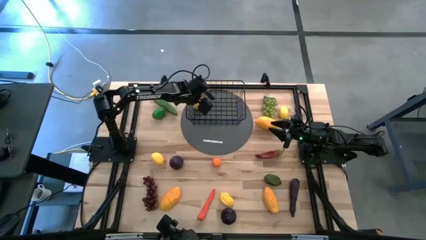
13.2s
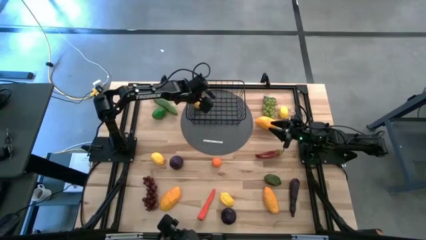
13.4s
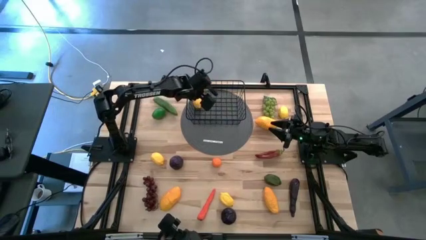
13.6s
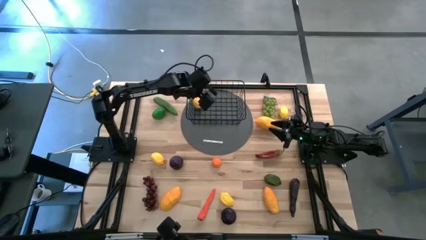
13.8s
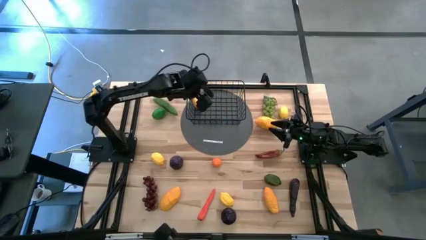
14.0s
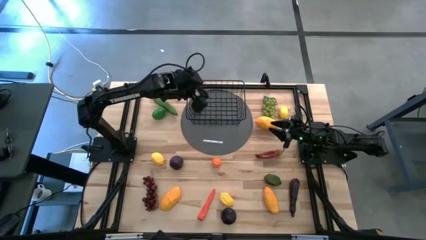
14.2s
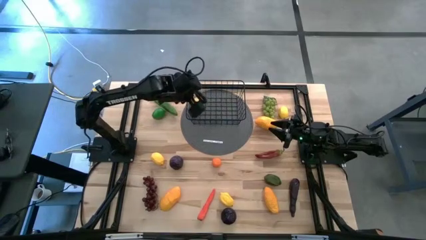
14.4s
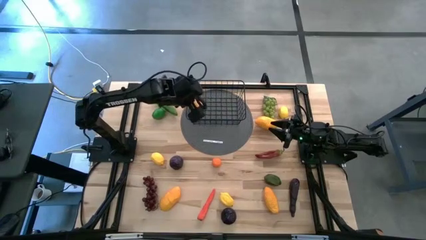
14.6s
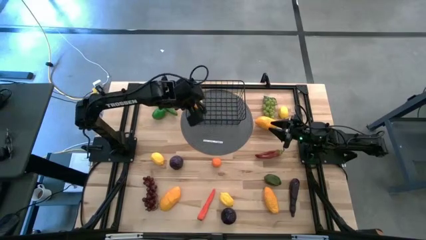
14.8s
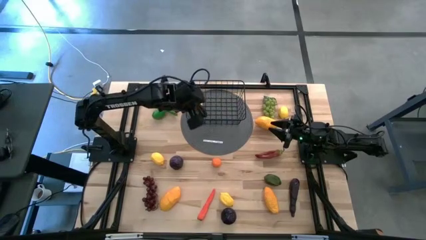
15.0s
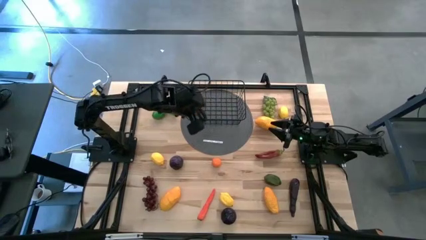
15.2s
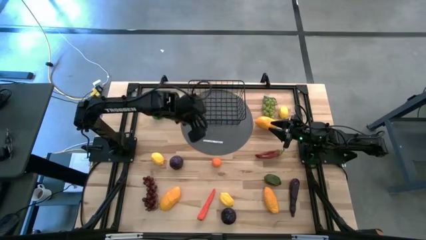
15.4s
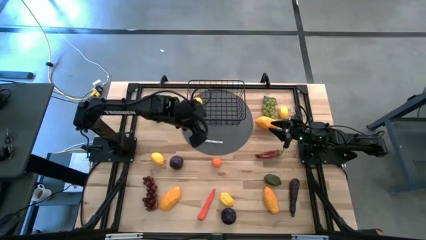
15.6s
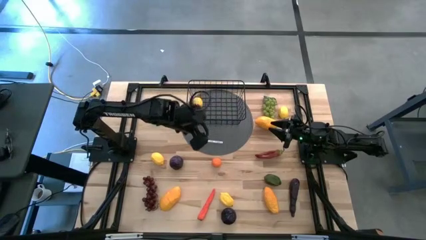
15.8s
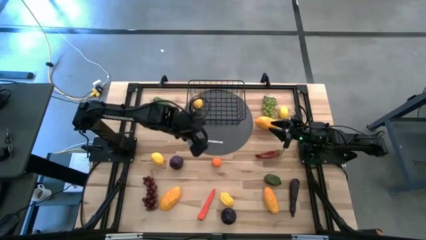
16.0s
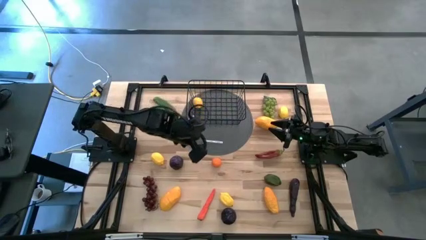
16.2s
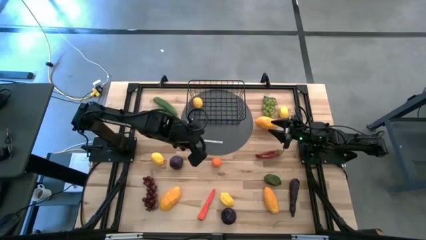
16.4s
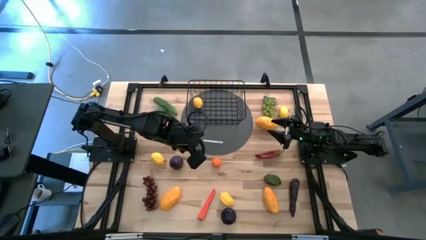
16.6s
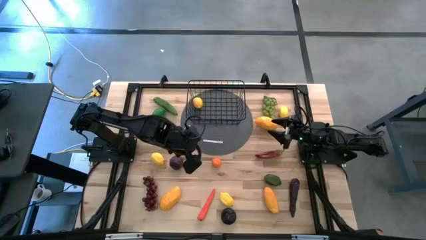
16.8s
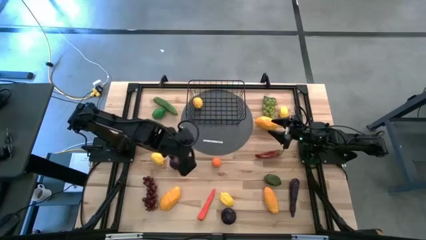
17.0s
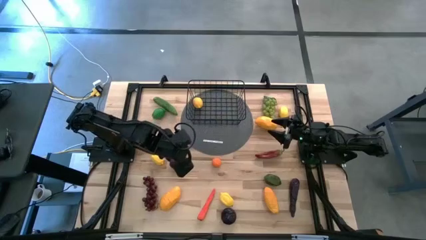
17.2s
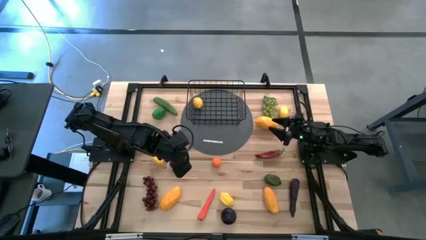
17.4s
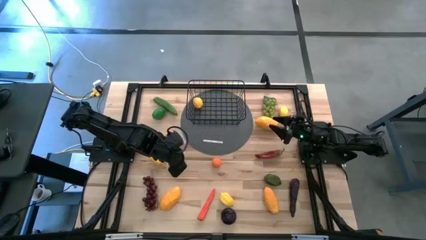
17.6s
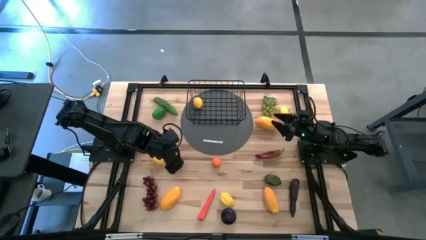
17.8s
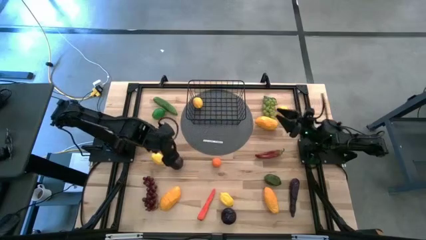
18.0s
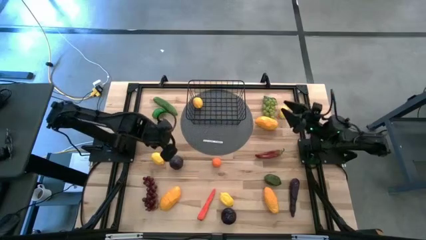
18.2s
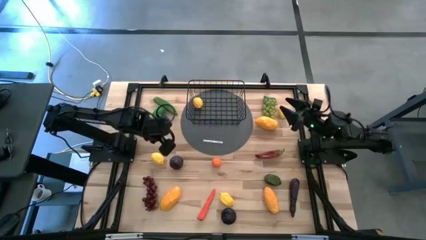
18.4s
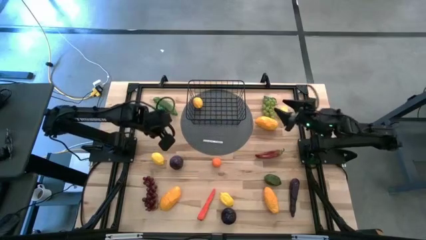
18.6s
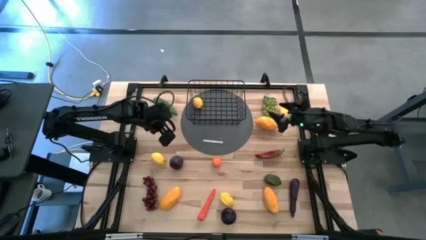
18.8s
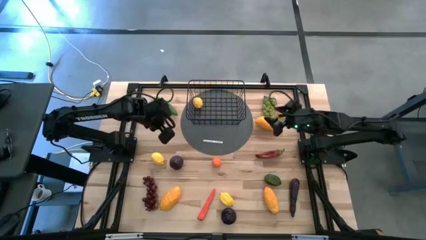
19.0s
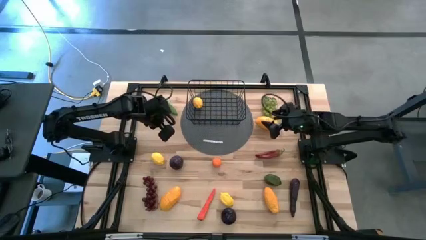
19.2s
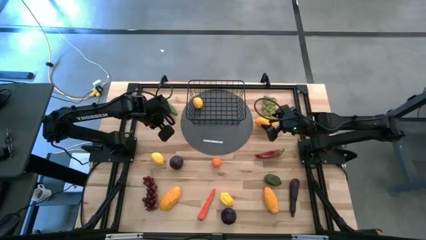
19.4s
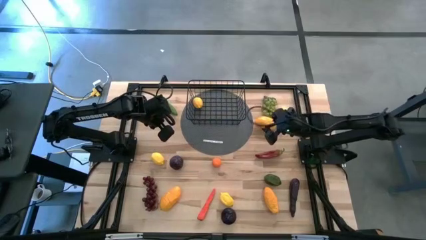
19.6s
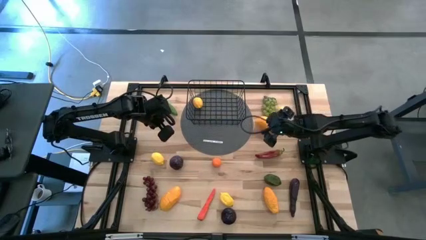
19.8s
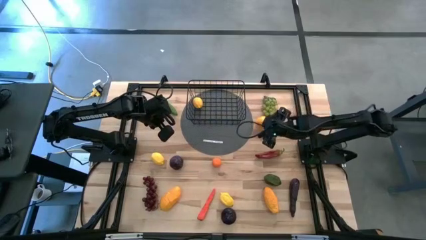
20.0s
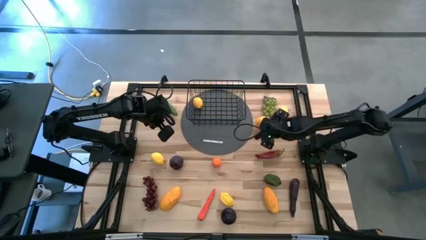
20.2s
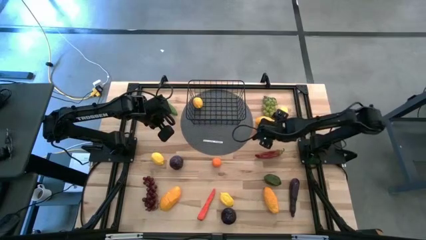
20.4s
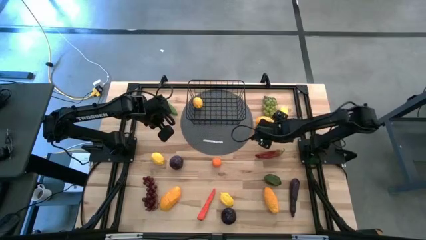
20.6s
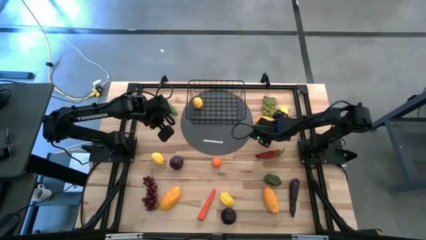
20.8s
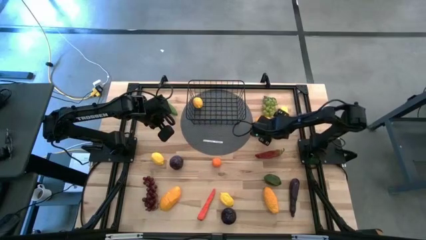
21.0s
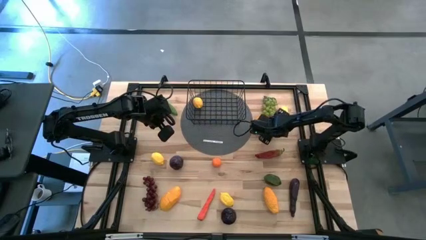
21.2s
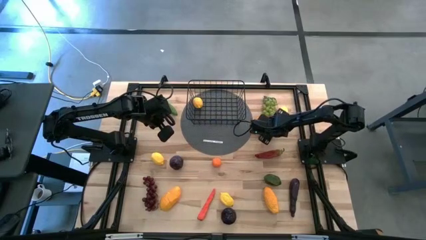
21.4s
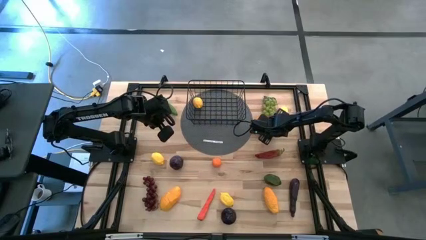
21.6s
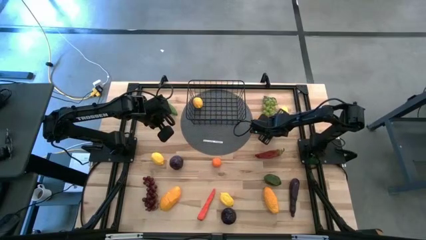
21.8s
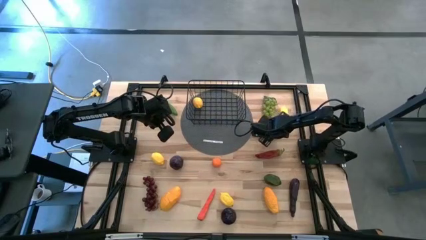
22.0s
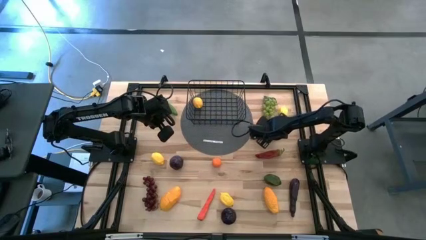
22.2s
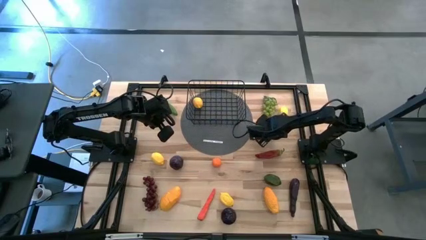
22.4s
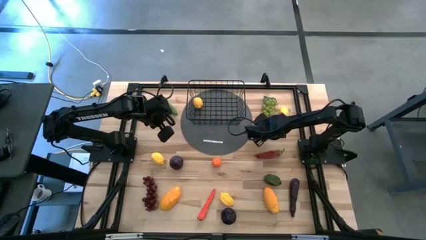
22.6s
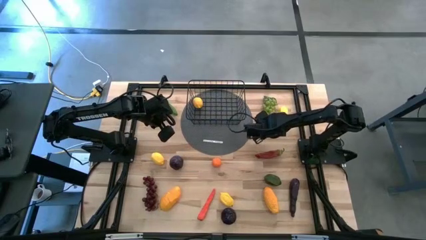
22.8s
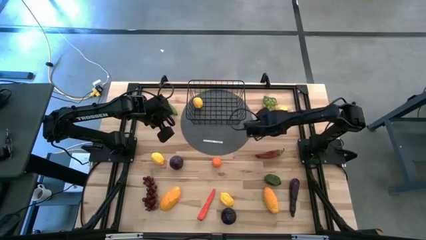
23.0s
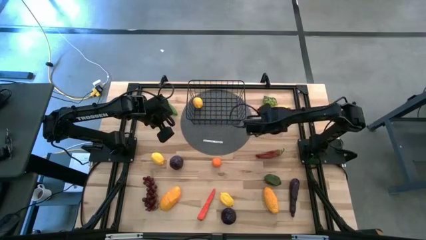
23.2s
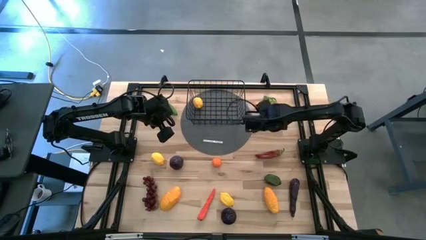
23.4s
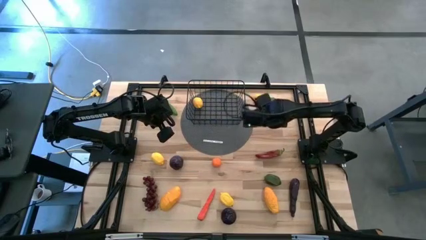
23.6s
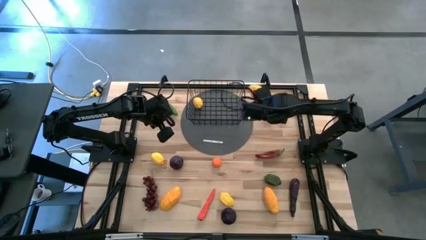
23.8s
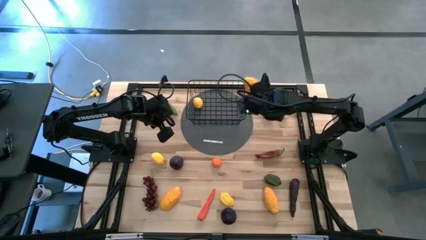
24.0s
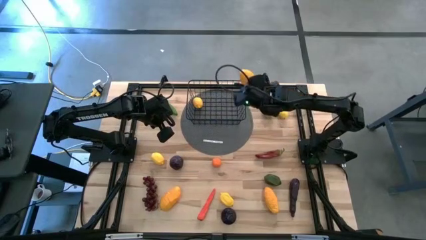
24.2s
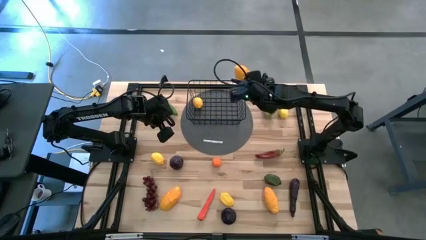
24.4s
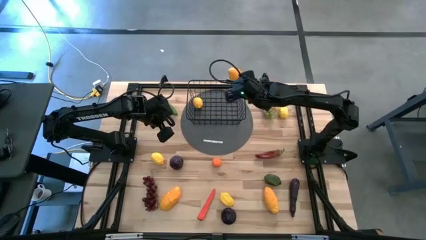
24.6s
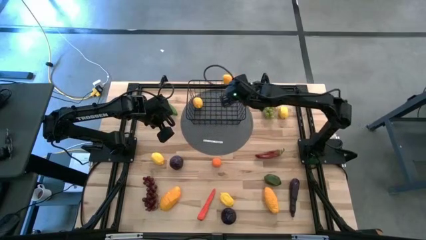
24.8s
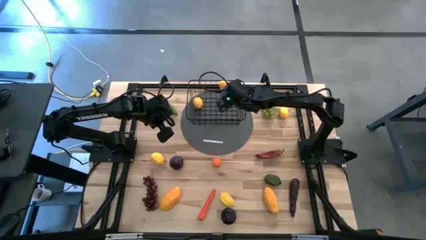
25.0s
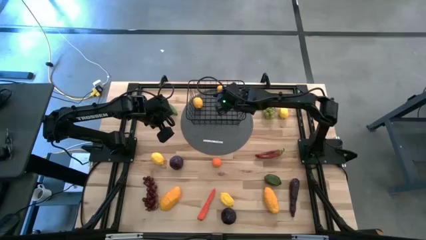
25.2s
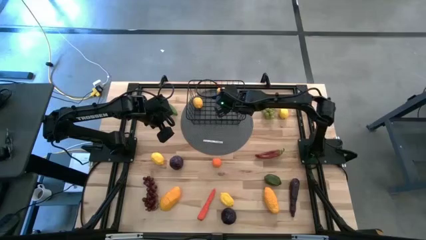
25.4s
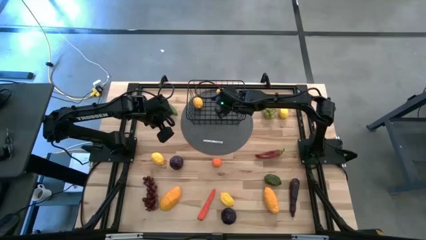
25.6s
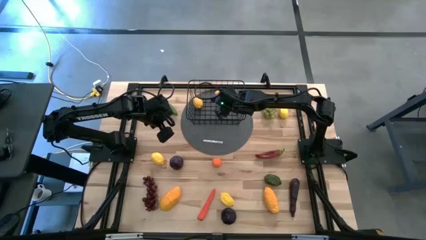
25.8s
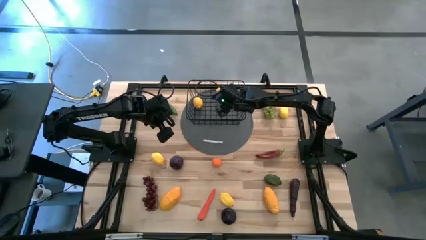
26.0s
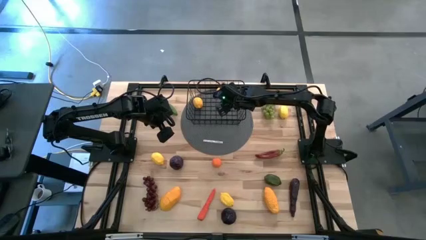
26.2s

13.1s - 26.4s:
Task: Build produce basket
Put the top right yellow mango into the basket

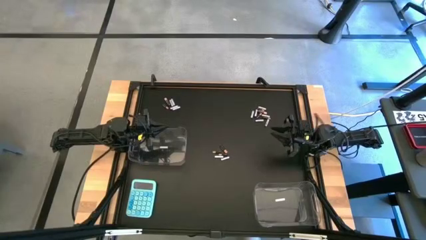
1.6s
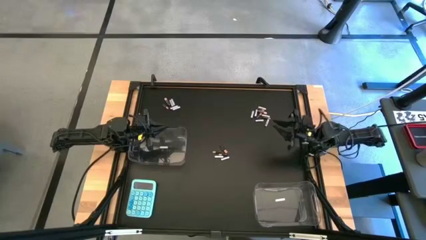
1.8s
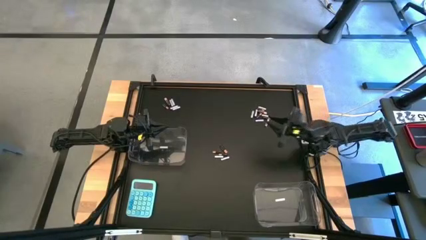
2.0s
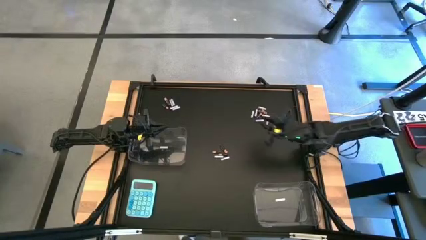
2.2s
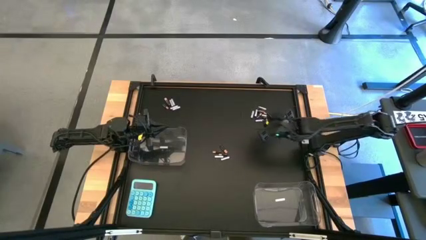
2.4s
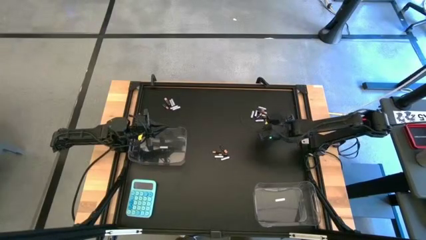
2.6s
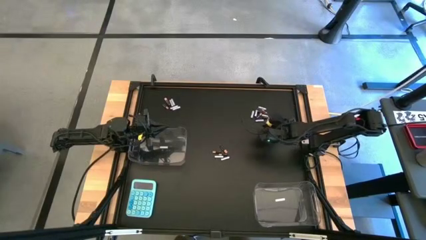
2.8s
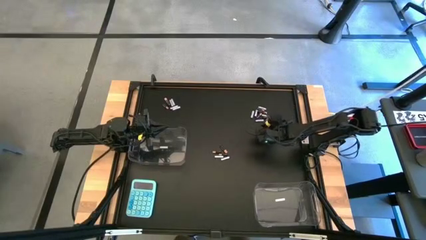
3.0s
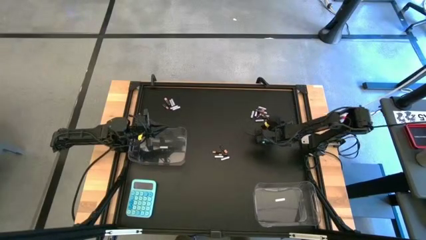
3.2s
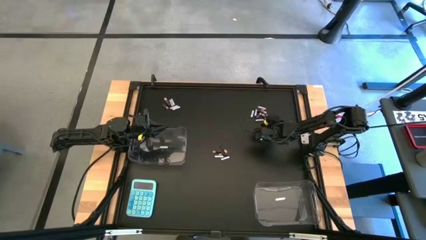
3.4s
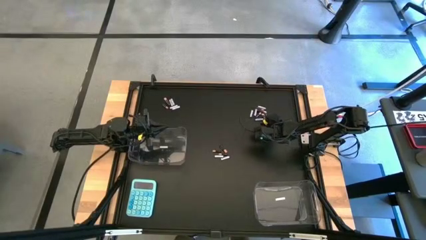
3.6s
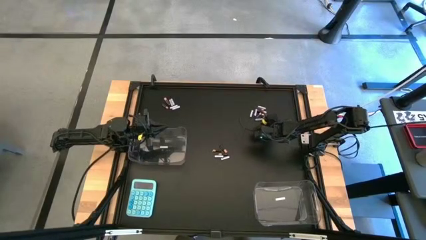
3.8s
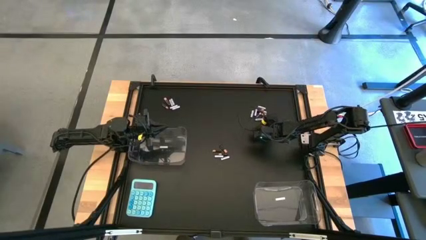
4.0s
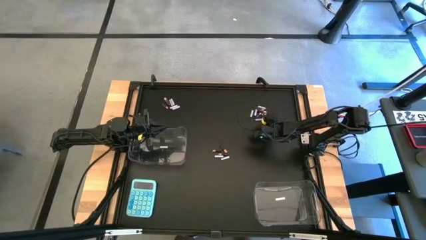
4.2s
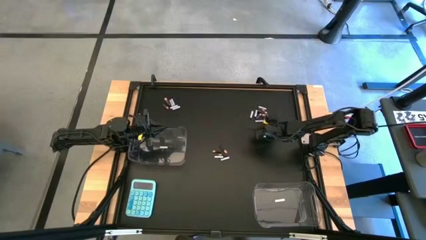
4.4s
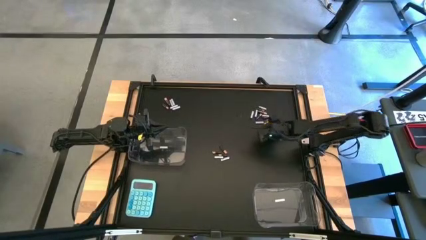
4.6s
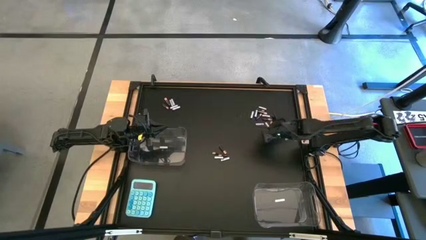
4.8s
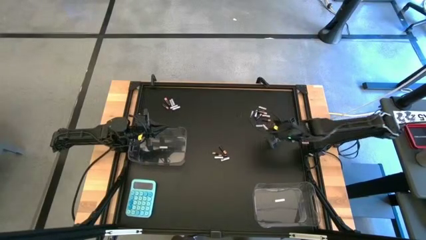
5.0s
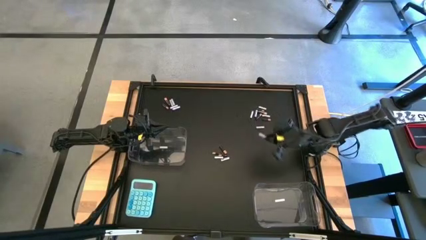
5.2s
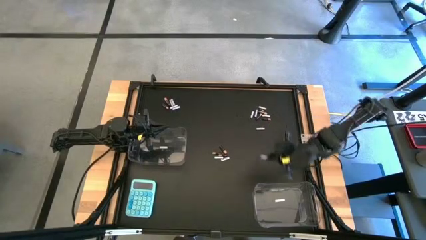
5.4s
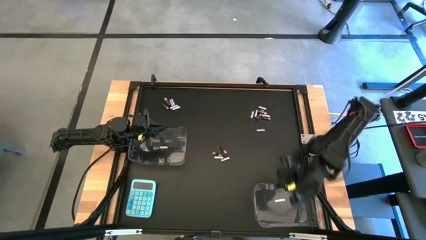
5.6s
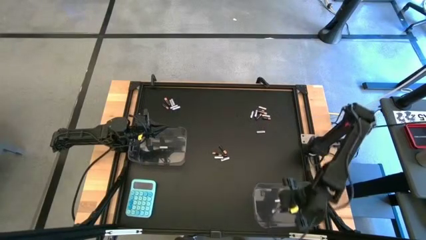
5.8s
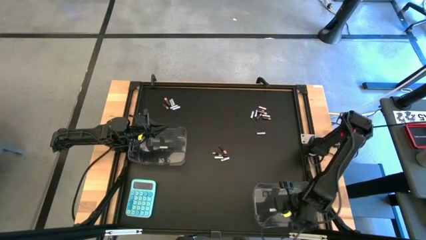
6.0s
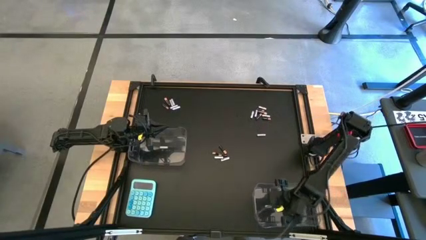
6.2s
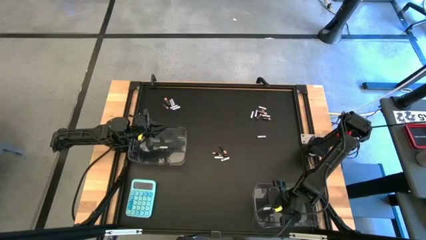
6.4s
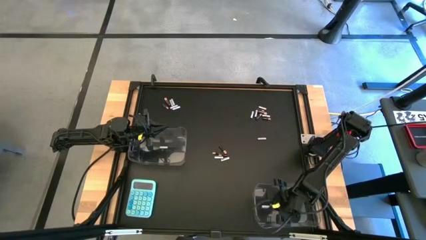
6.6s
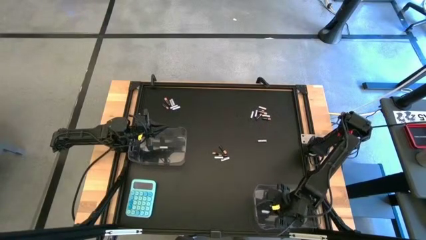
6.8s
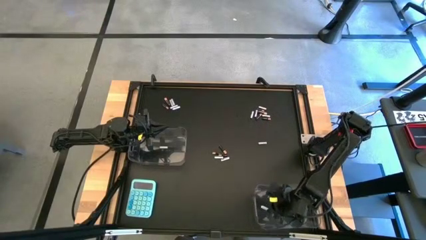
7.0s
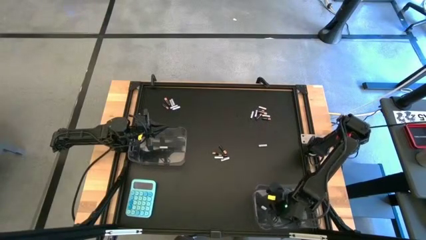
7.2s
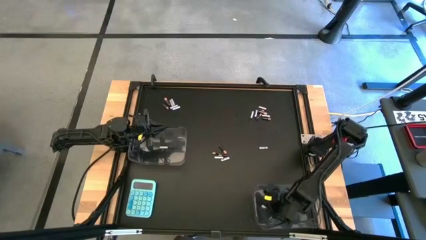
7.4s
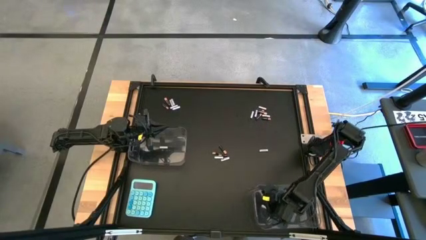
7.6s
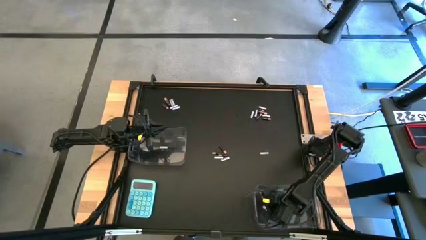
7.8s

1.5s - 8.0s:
Task: Sort batteries
Put the white battery into the right transparent bin
